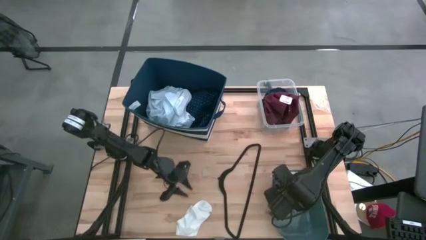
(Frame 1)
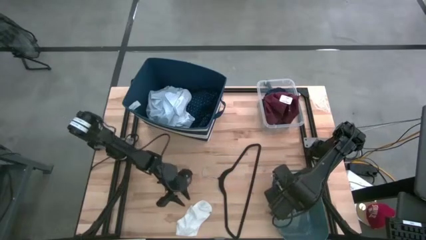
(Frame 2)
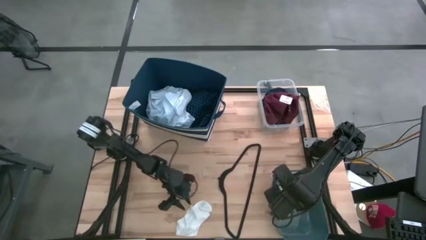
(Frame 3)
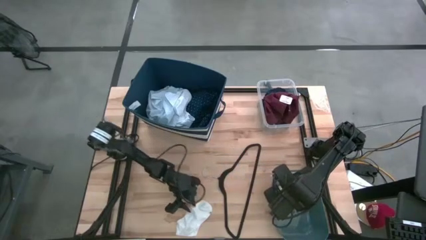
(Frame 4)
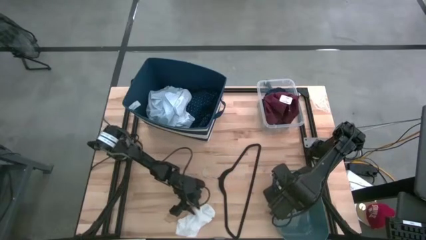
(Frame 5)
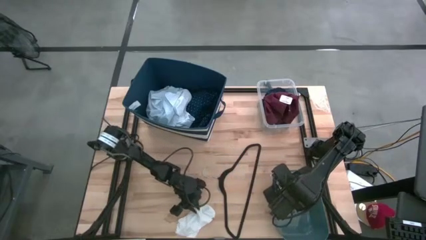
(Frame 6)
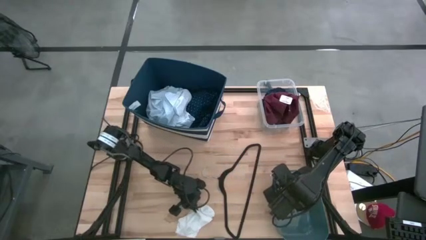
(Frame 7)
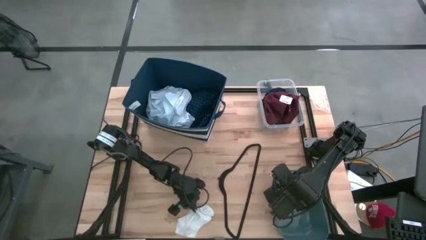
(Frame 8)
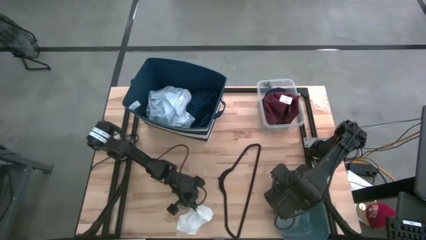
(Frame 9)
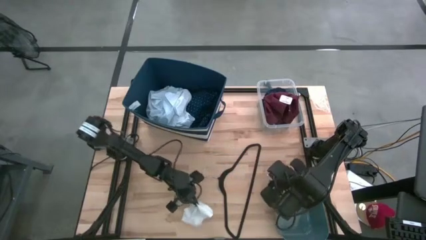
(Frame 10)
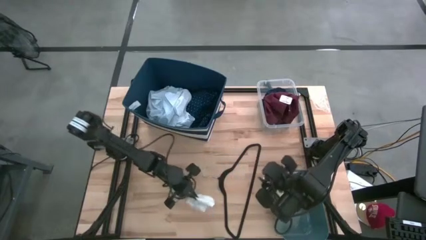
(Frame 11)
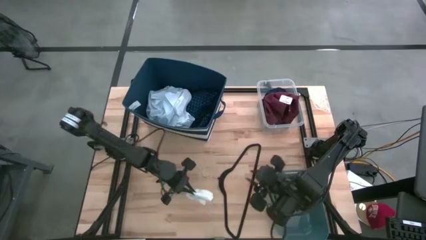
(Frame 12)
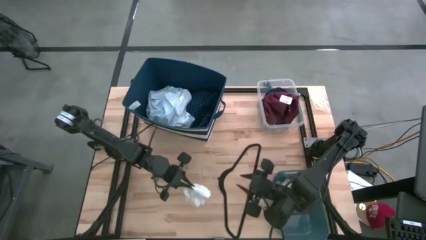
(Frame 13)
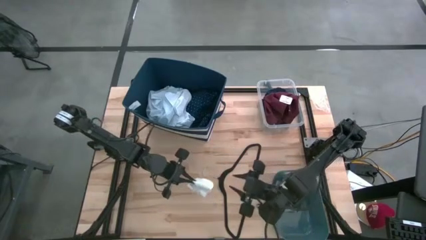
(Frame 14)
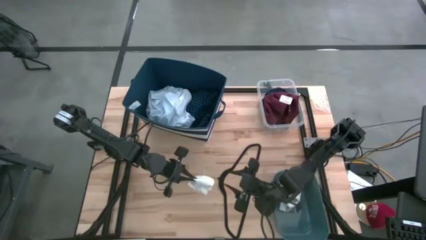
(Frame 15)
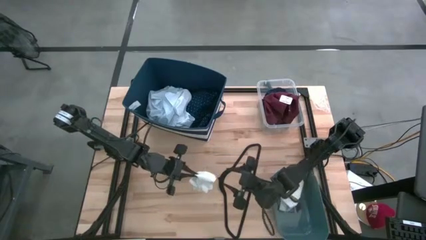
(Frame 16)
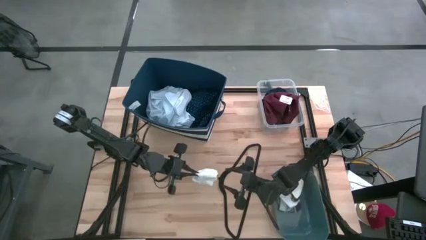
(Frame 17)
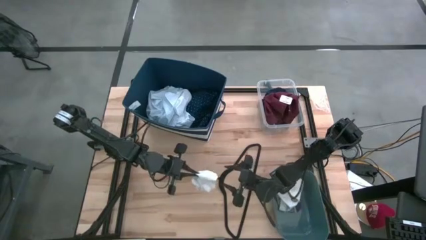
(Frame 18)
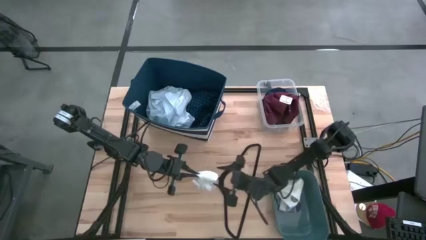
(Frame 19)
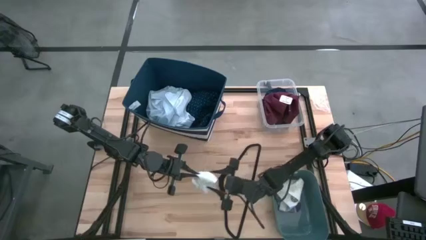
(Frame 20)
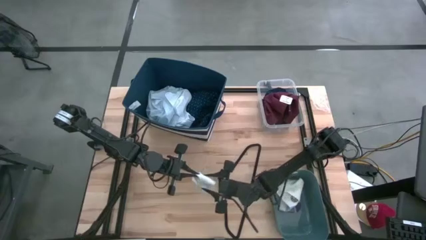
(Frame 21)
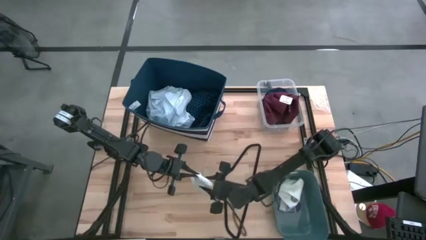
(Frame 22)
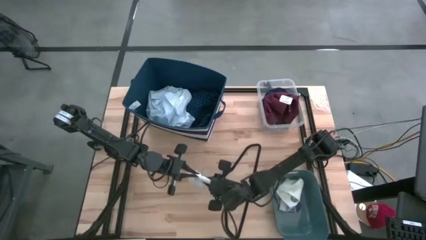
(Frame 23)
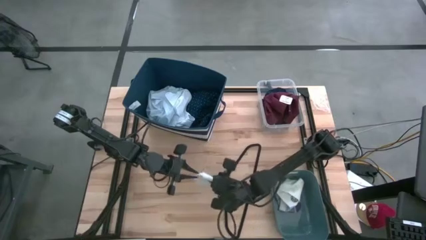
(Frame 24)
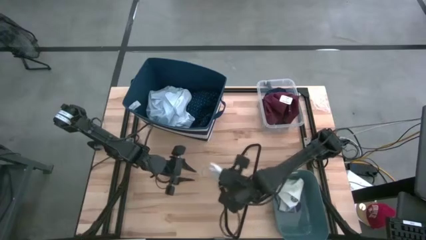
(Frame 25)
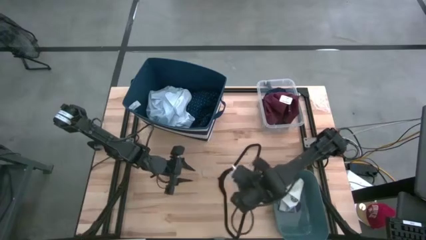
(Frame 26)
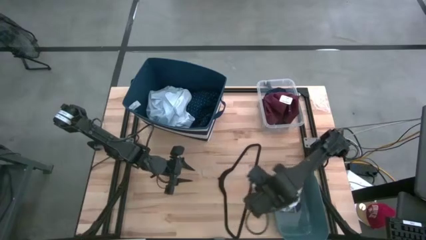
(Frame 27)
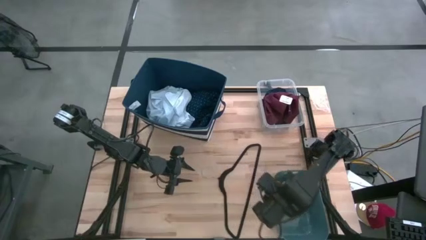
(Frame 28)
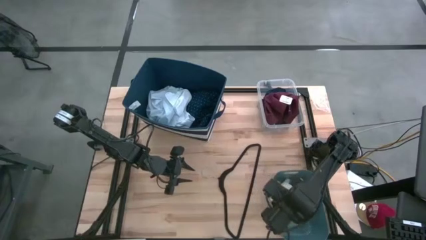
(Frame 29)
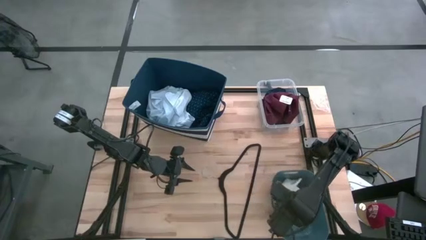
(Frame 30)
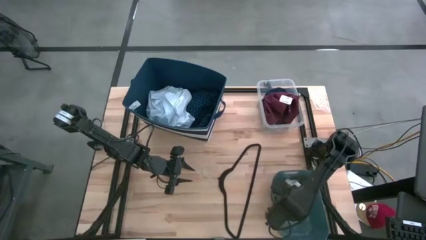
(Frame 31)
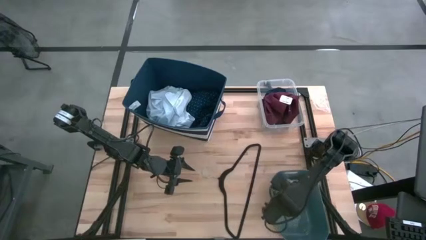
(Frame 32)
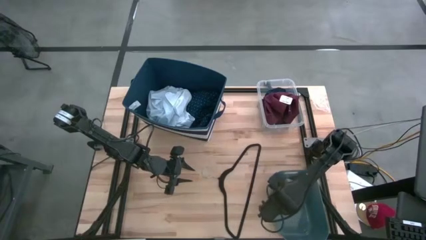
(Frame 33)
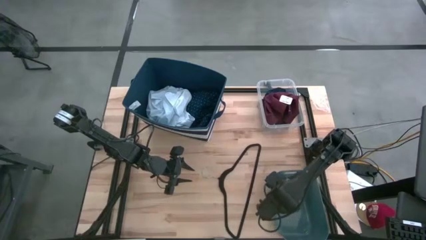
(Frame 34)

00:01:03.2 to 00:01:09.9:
Task: Pick & Place Cloths
Put the white sock into the dark blue bin

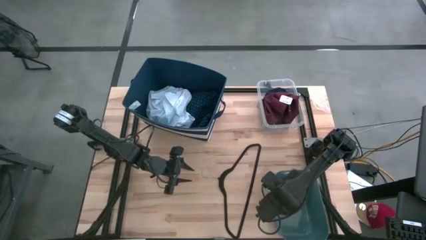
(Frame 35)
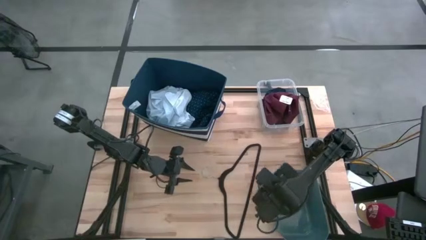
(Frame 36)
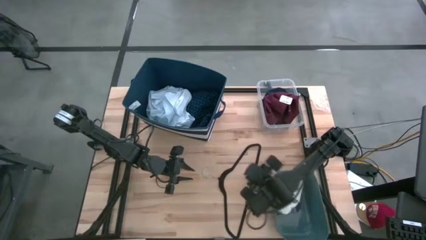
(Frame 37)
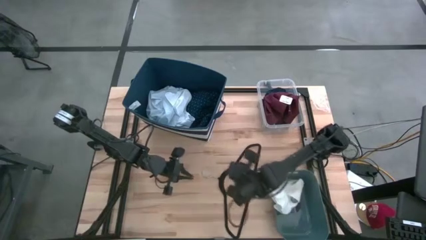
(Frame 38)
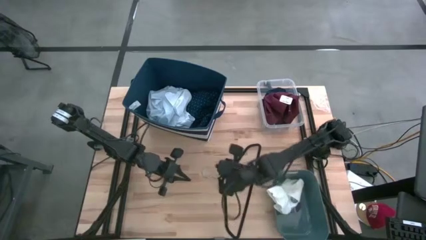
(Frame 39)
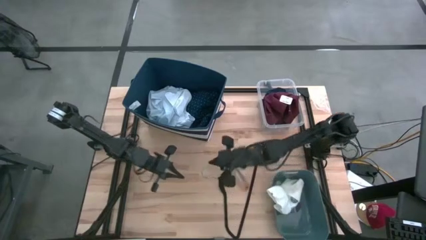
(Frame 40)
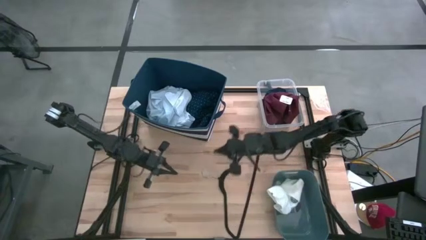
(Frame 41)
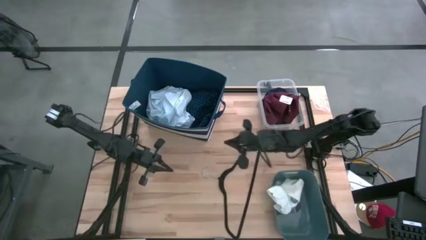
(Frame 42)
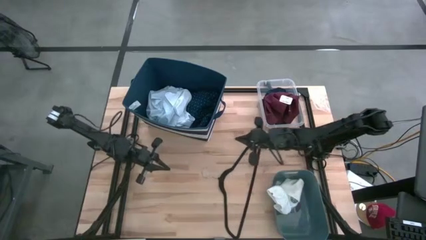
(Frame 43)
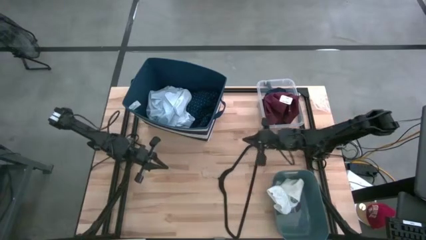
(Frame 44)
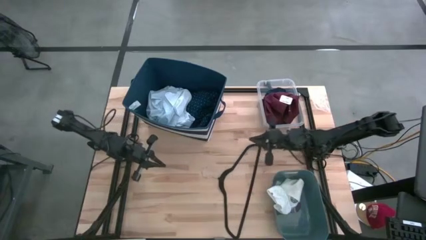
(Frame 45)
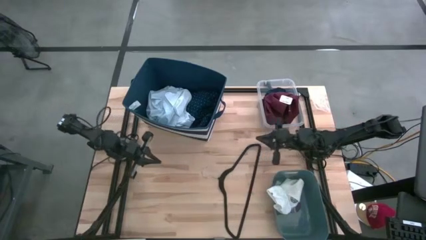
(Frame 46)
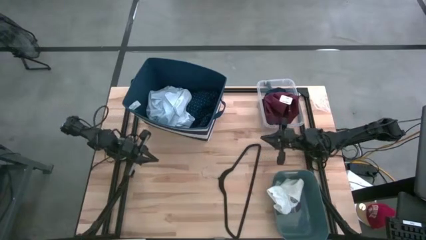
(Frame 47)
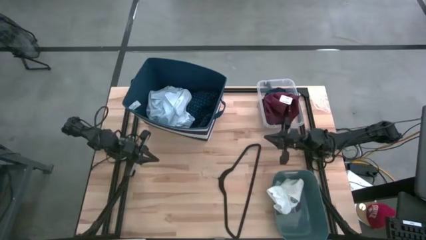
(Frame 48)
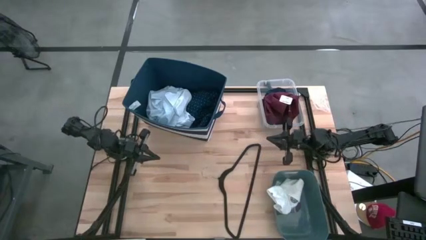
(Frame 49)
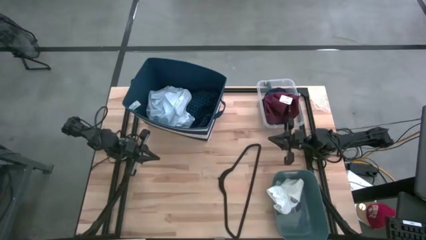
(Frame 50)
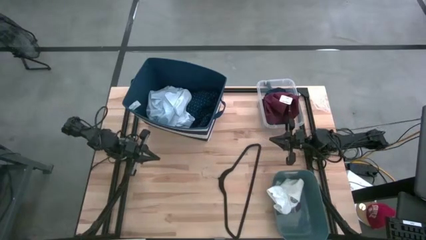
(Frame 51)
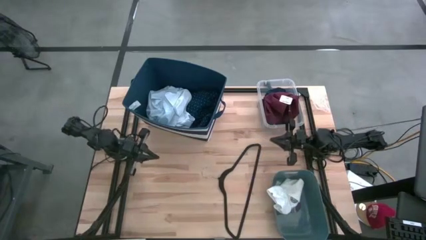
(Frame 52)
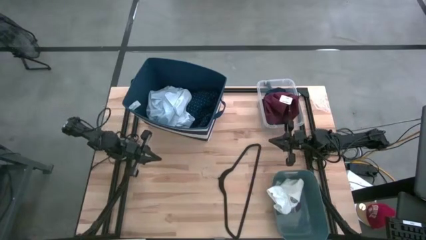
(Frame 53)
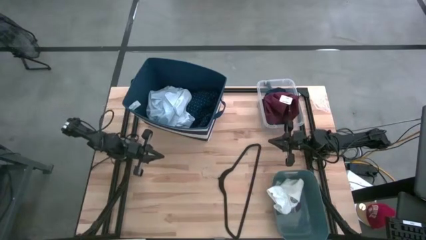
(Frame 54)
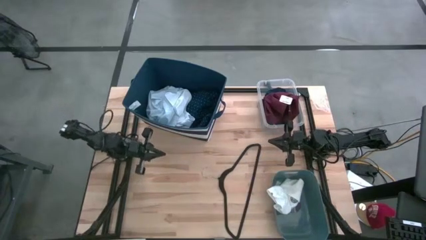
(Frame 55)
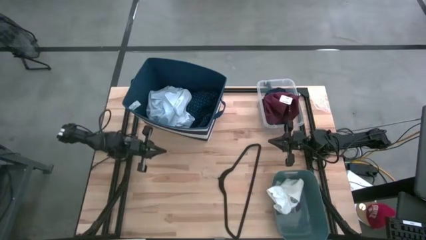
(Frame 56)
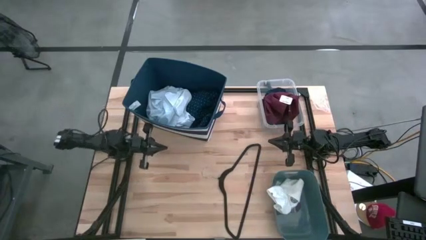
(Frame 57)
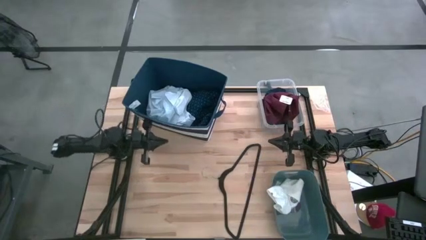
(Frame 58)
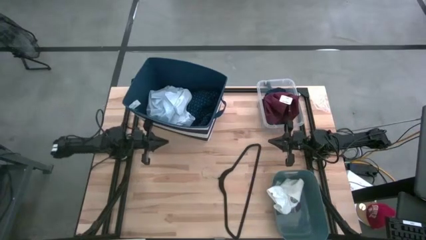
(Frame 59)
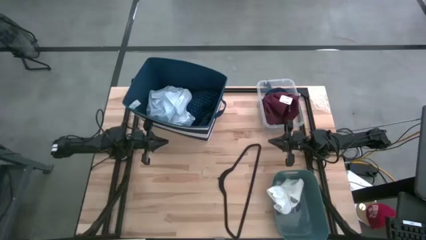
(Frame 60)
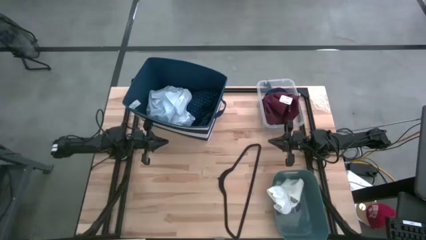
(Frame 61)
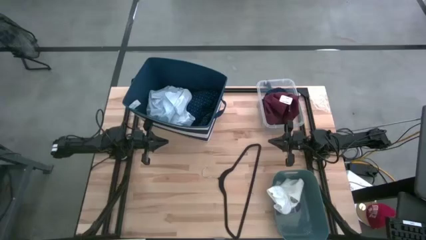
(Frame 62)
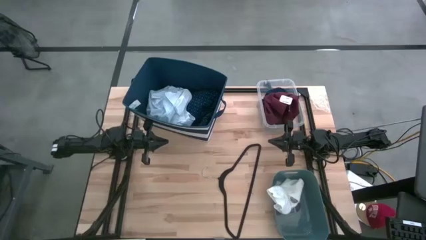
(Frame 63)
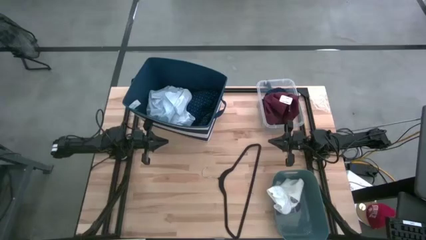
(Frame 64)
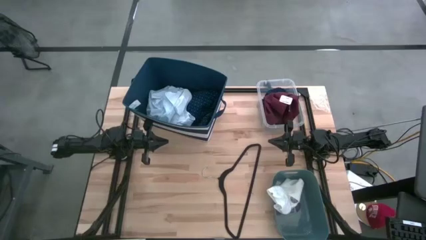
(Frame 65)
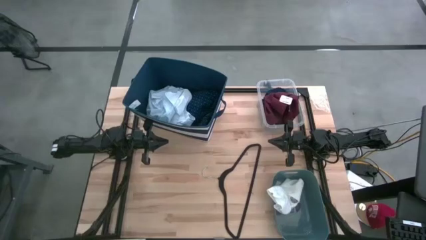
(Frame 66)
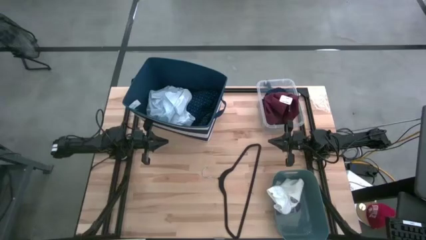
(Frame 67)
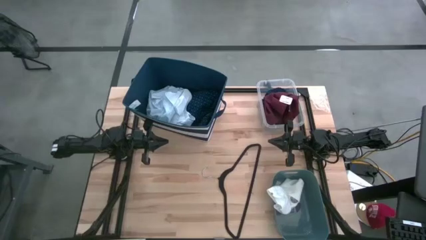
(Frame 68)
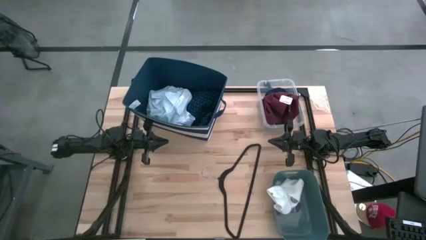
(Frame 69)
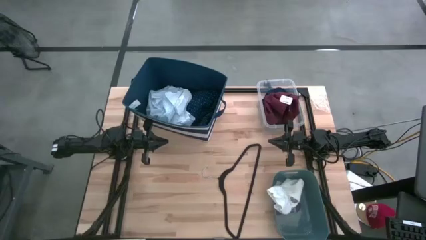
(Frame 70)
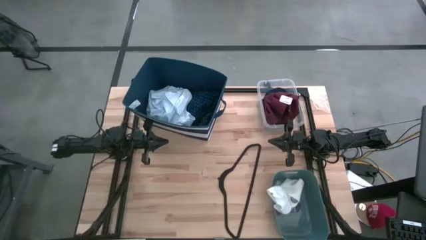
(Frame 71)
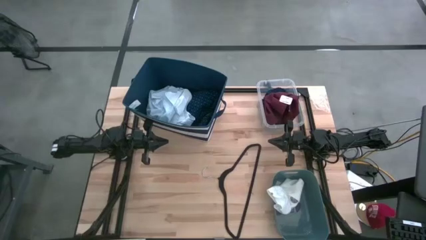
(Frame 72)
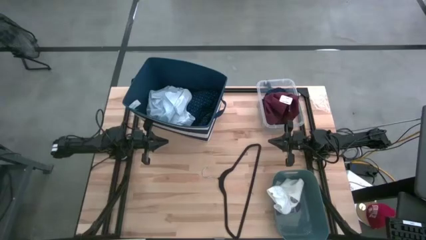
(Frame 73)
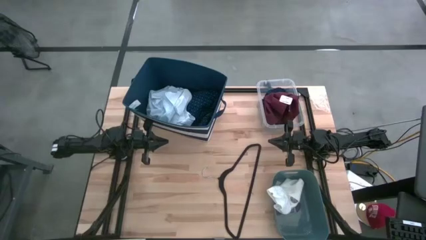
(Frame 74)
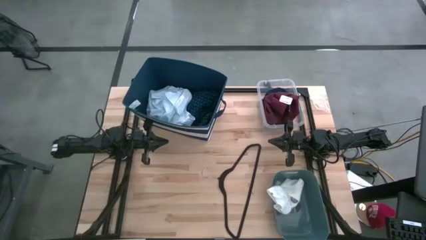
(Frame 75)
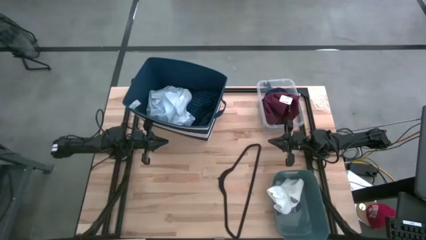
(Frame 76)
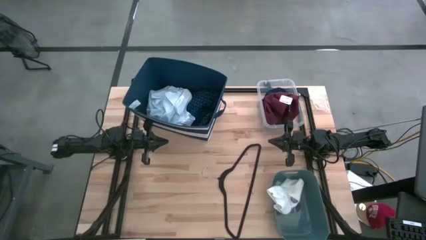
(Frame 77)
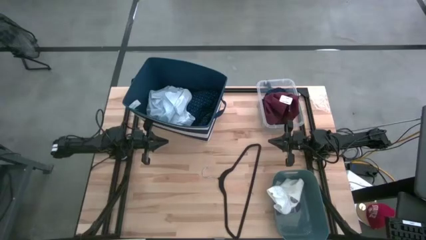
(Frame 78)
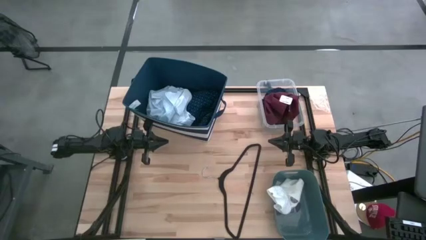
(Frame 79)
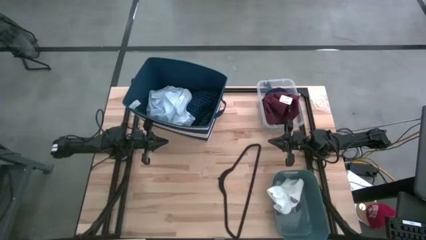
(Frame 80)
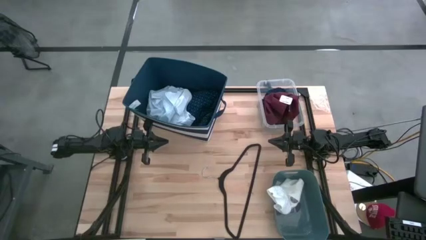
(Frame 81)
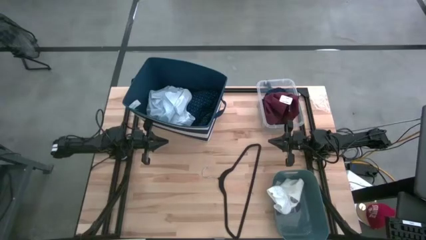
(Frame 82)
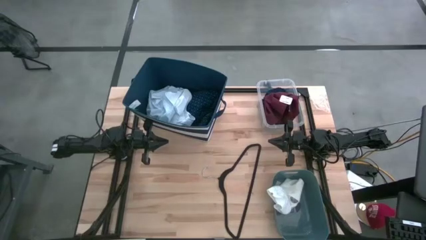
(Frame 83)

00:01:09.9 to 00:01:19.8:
Return to Home Position

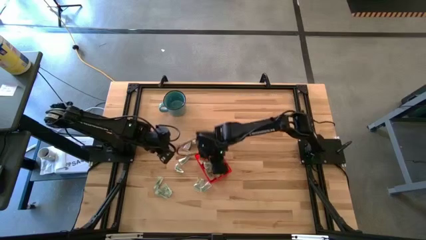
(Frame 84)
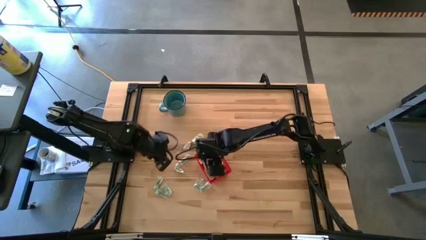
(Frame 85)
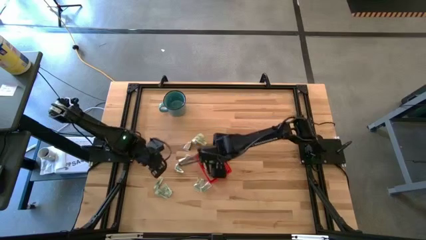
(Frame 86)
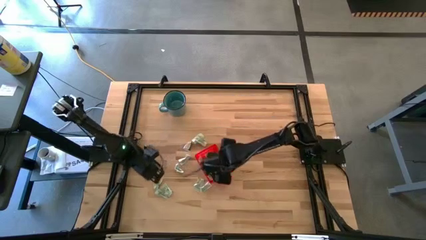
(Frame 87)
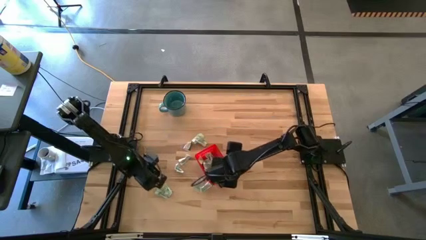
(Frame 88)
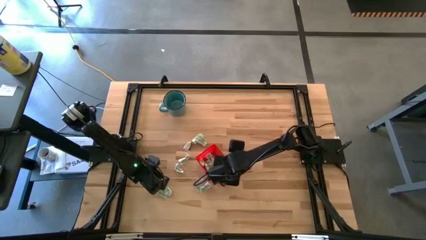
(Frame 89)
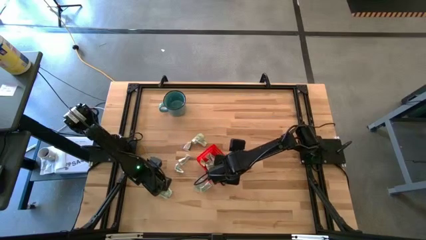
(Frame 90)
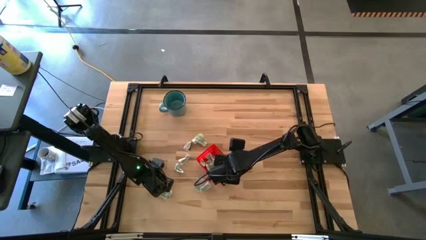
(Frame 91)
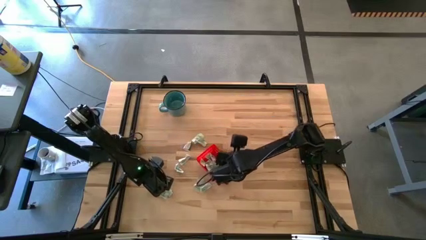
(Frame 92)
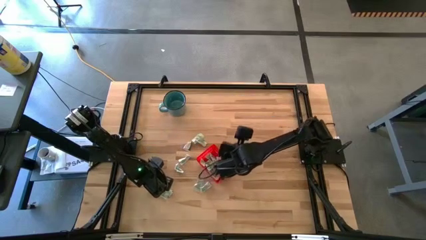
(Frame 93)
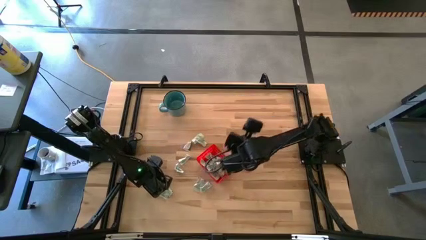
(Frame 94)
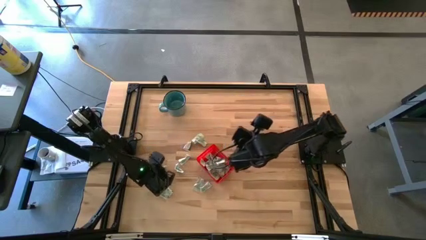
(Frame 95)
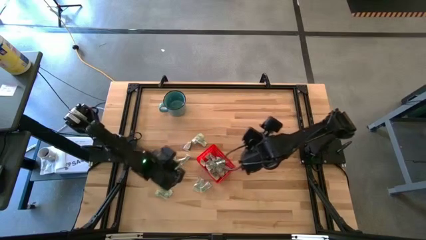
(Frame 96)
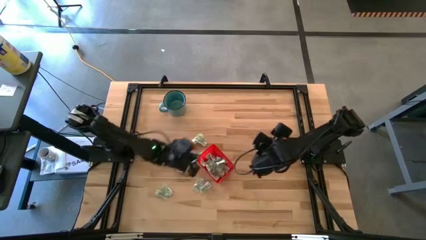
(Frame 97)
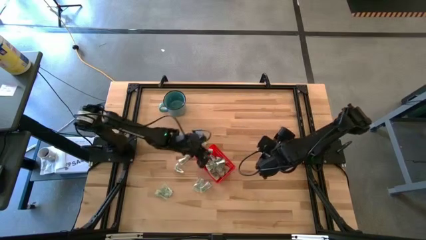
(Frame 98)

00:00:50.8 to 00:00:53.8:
Task: Pick and place Stevia / Truvia into bins
Put the white stevia packet into the basket
